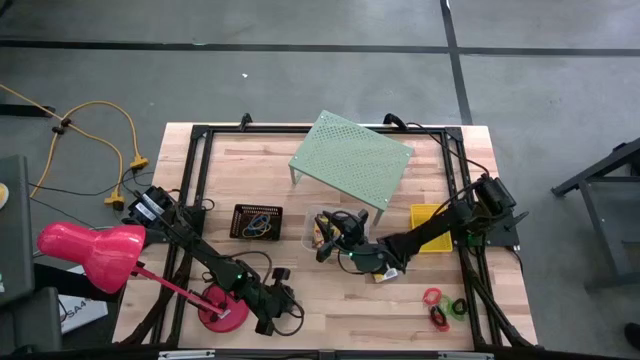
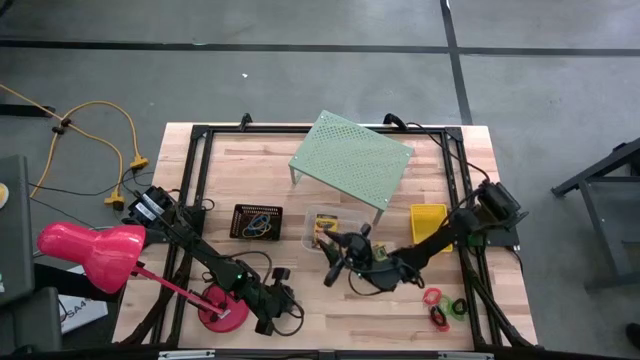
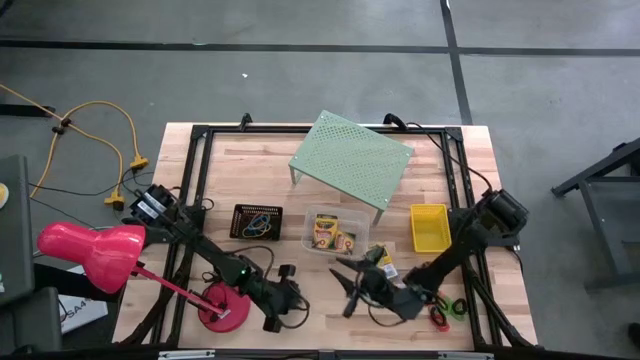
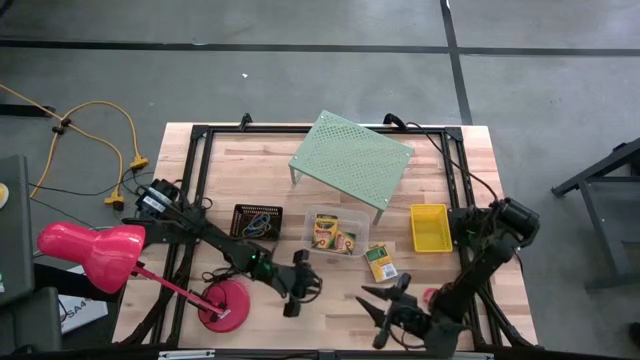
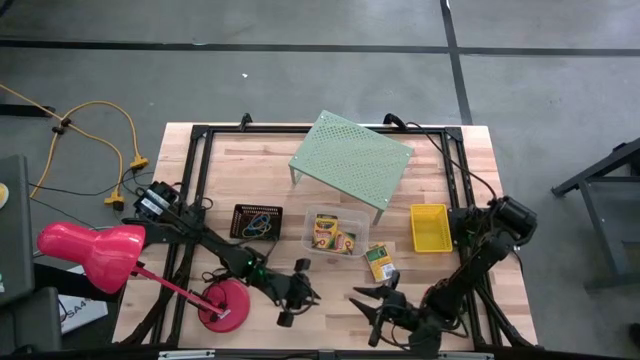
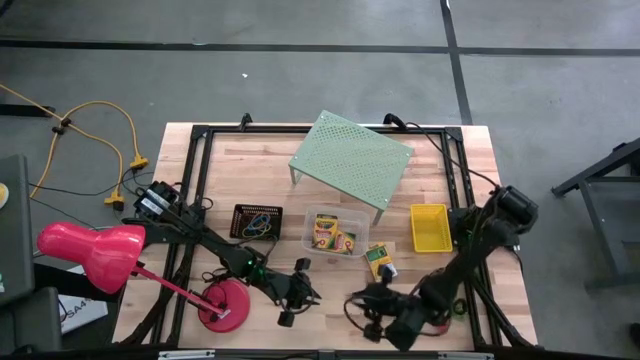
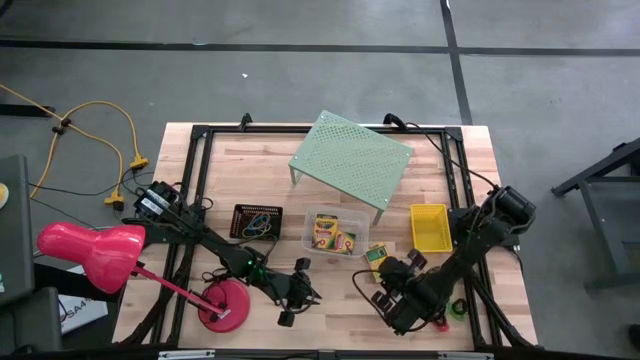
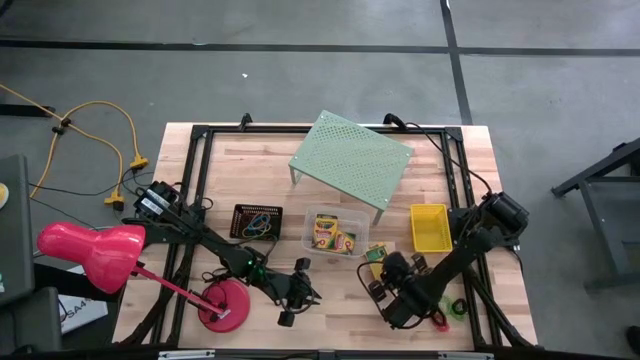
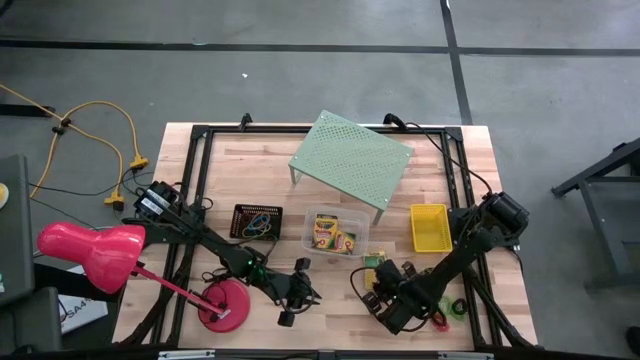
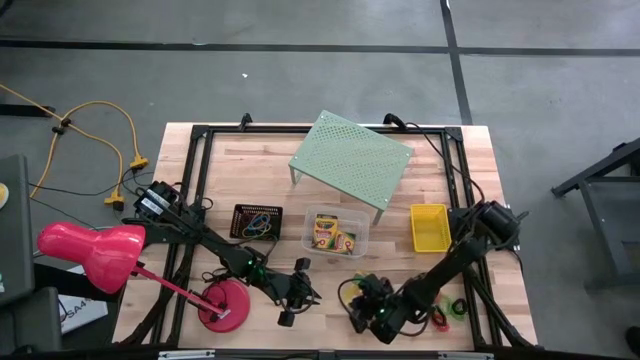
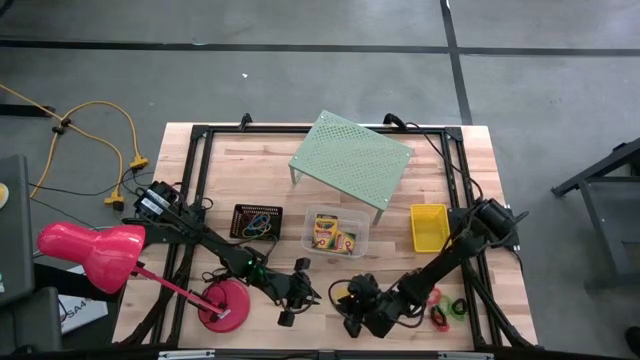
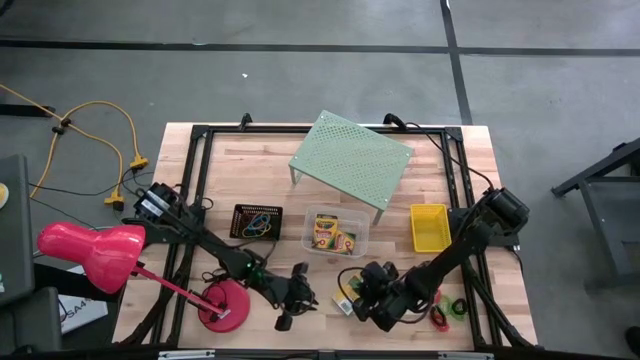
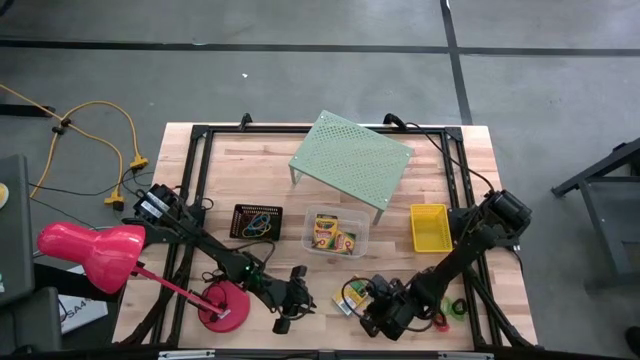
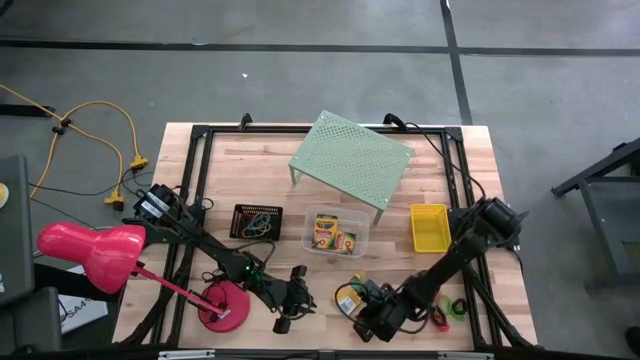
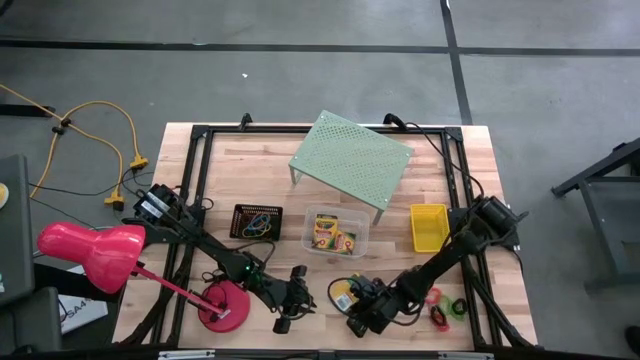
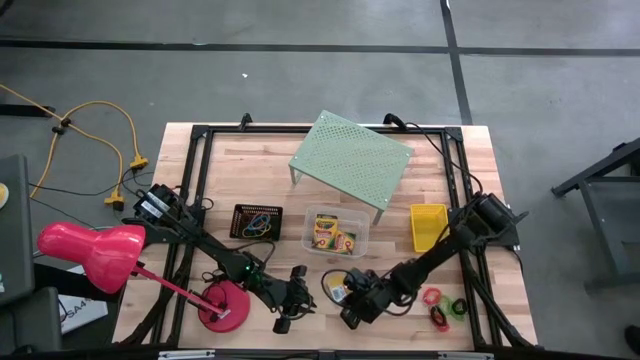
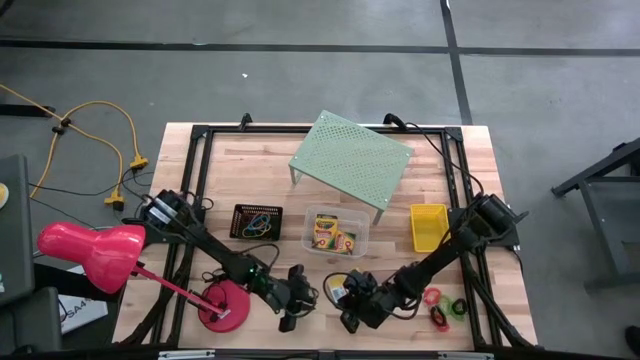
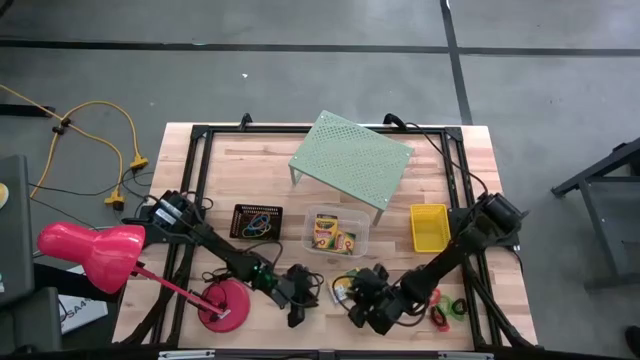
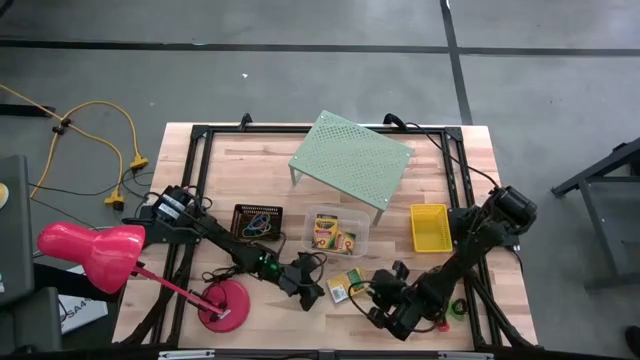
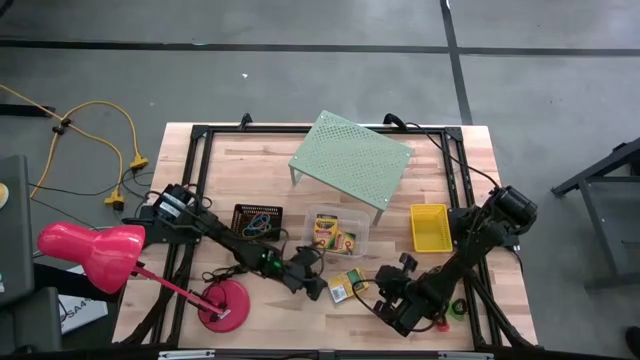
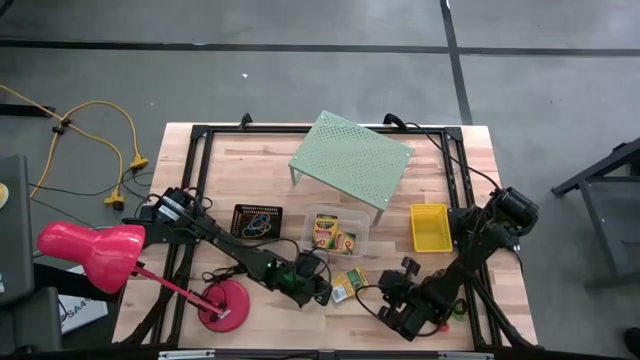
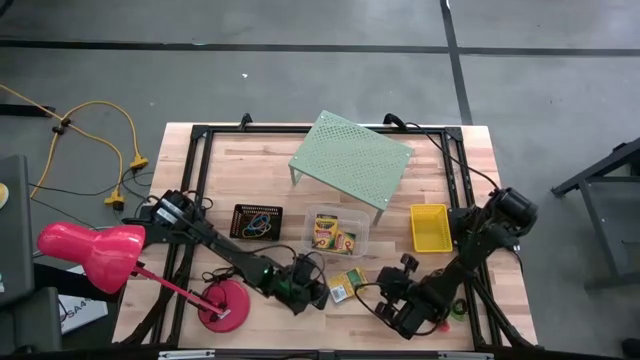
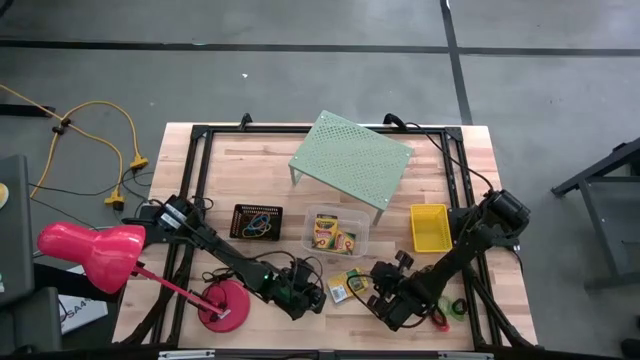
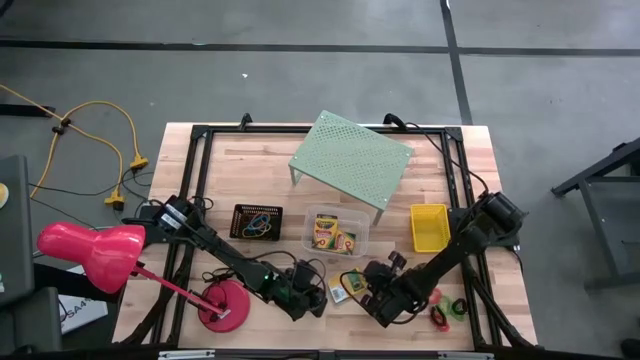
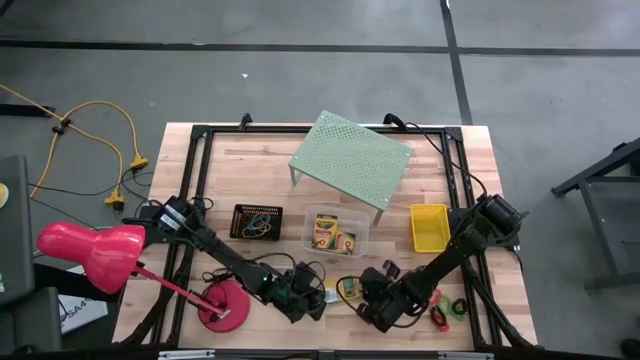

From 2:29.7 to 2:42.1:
Task: Pick & Place Office Desk Supplies
Put the yellow crayon box into the transparent bin

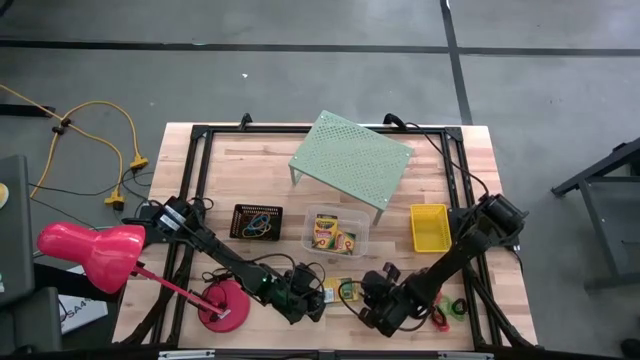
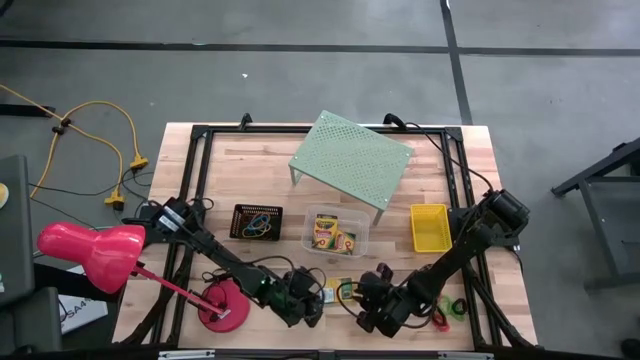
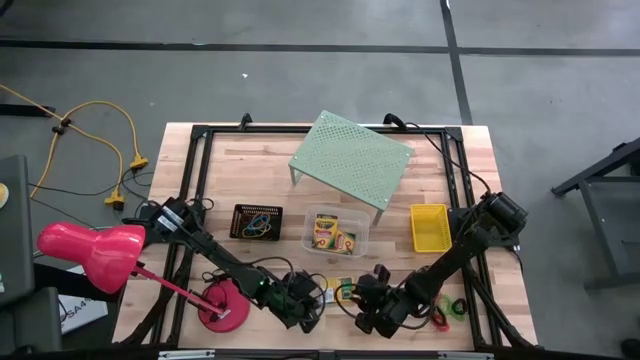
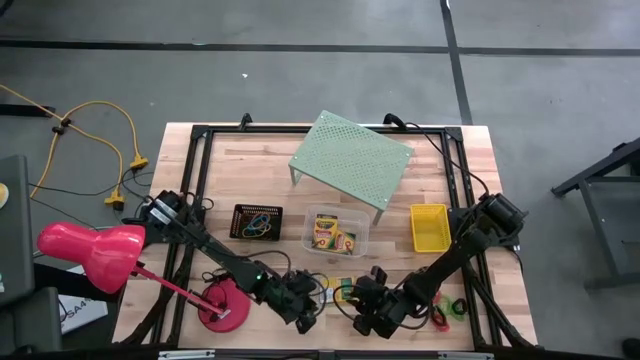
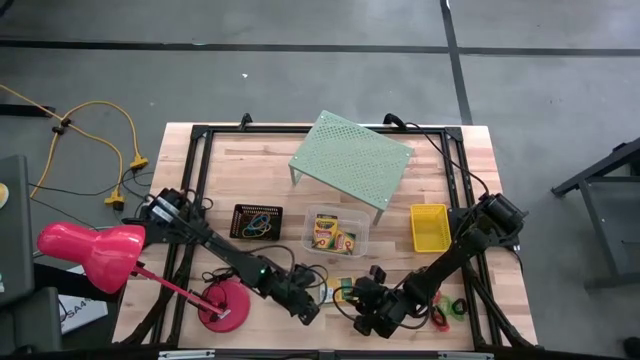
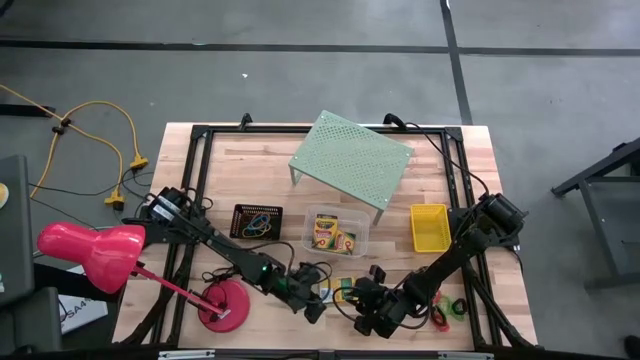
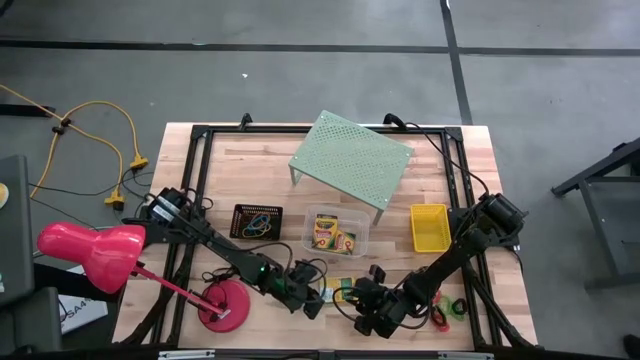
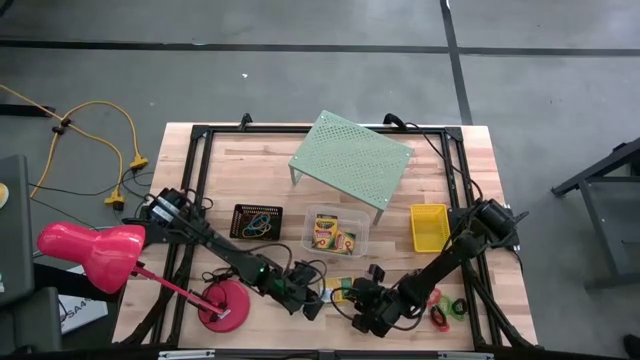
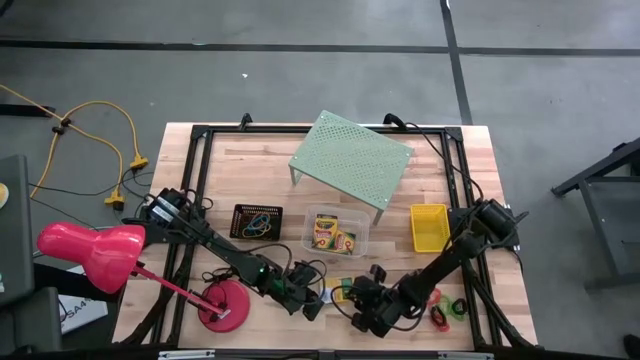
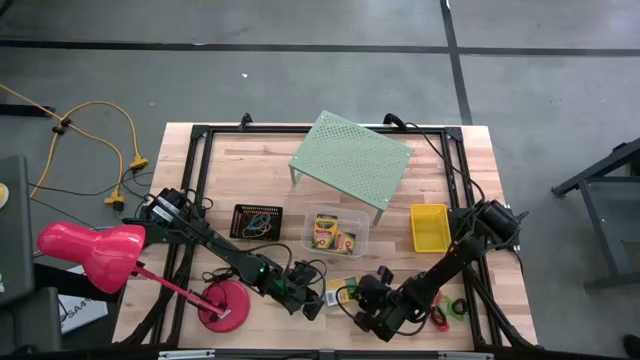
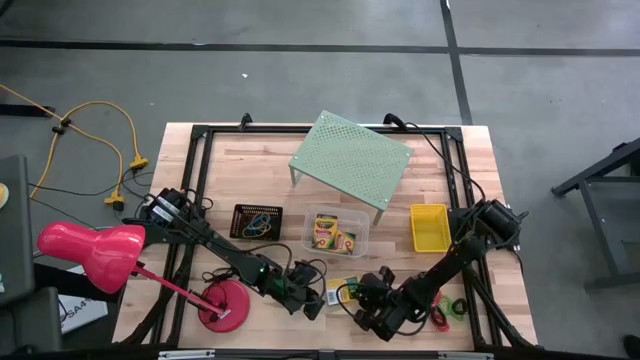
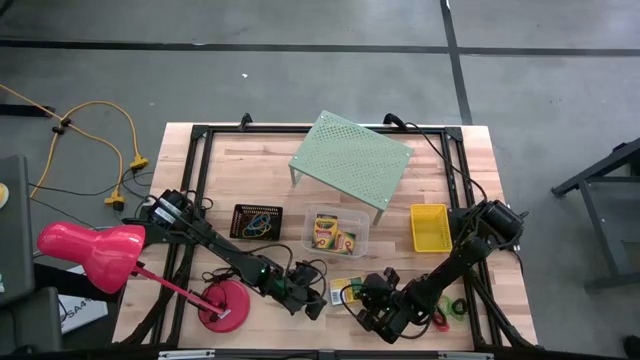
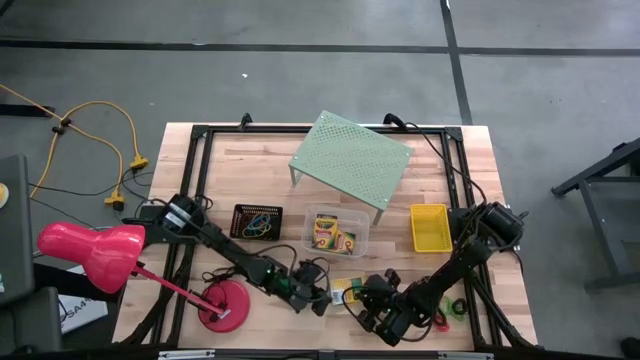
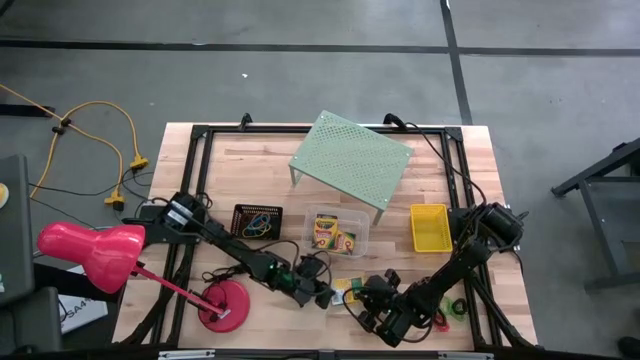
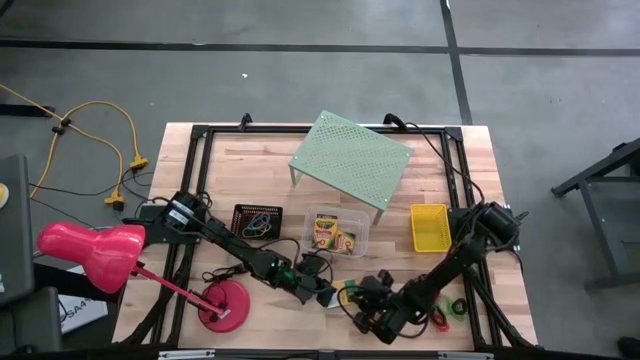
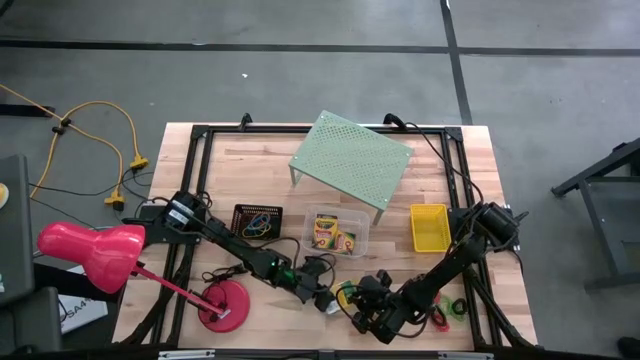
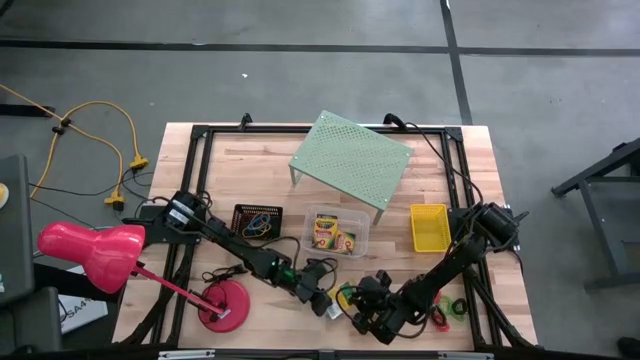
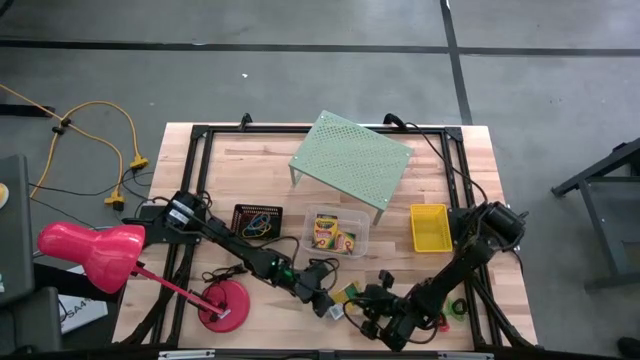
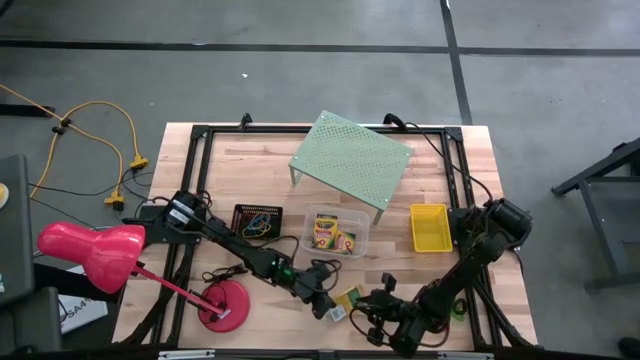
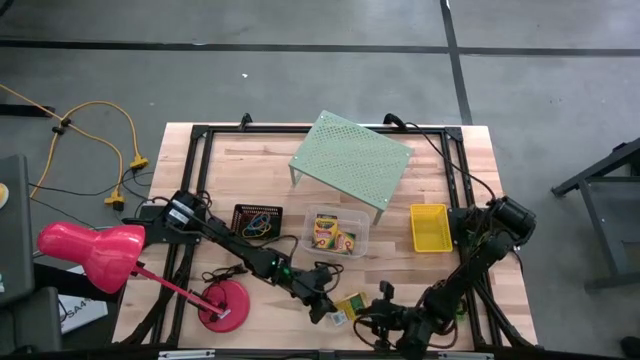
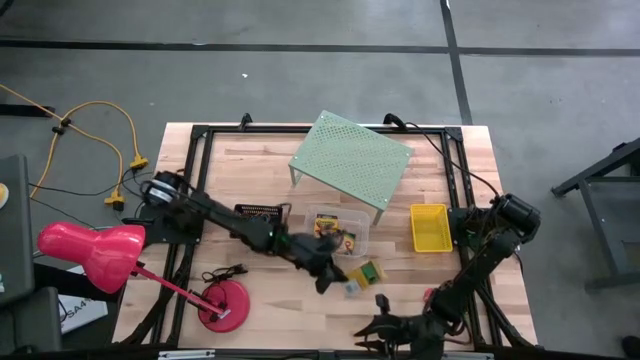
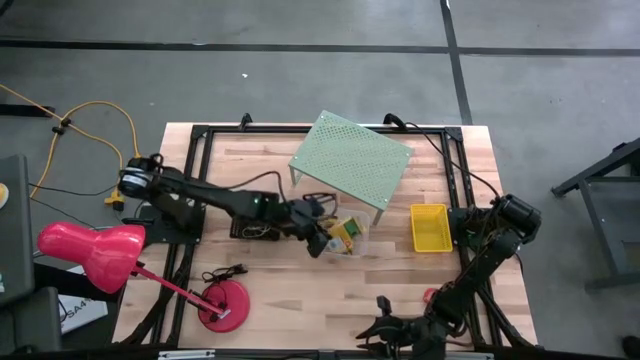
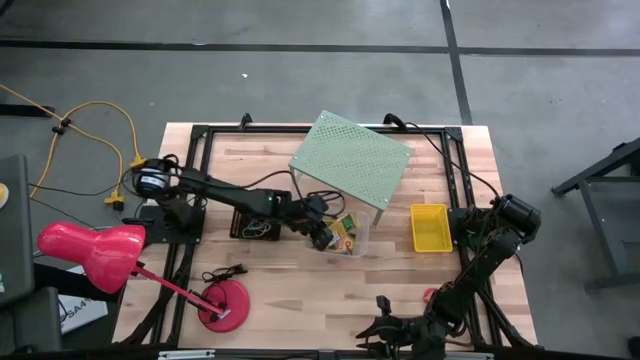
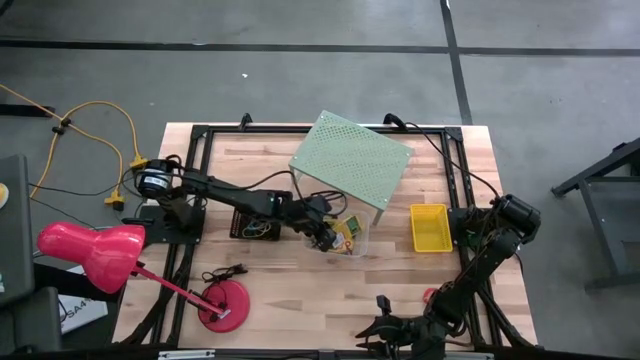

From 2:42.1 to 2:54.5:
Put the yellow crayon box into the transparent bin
